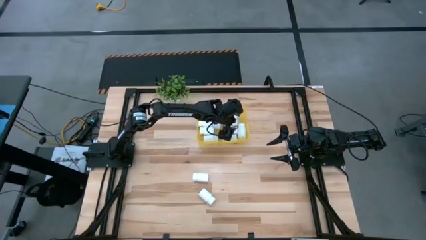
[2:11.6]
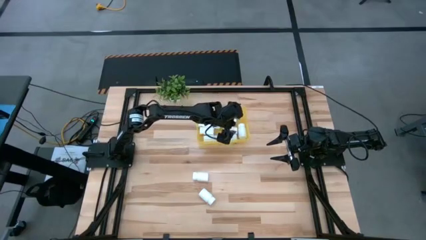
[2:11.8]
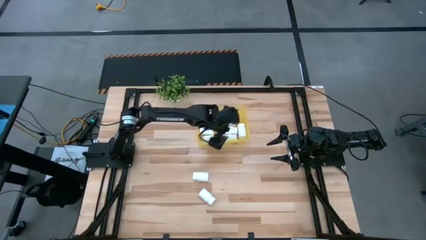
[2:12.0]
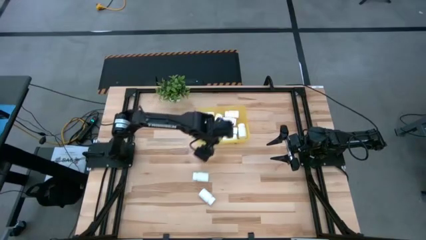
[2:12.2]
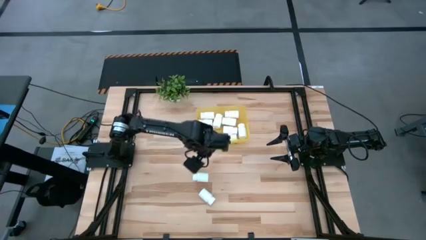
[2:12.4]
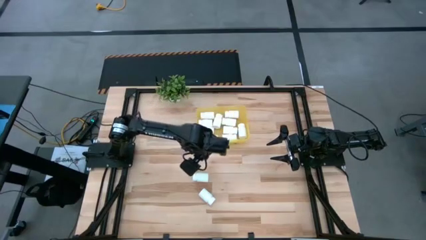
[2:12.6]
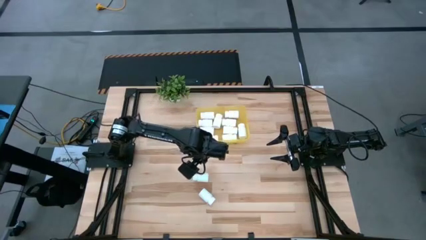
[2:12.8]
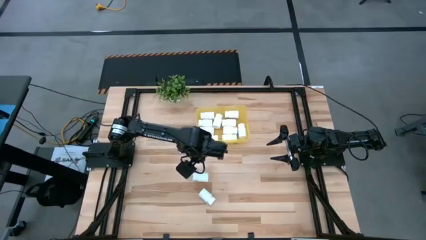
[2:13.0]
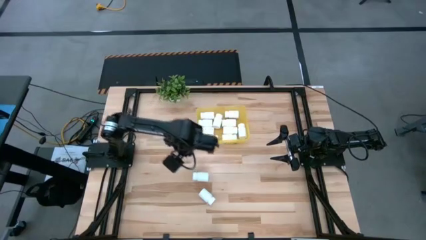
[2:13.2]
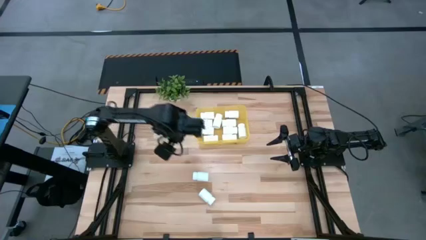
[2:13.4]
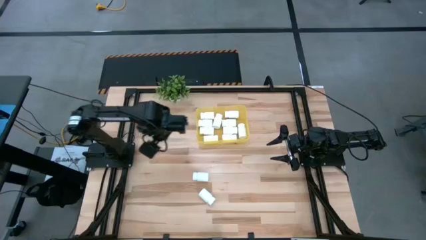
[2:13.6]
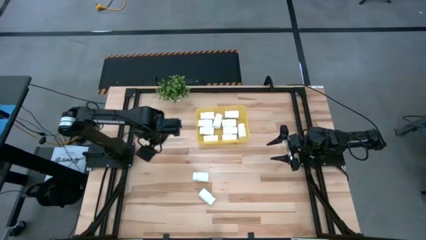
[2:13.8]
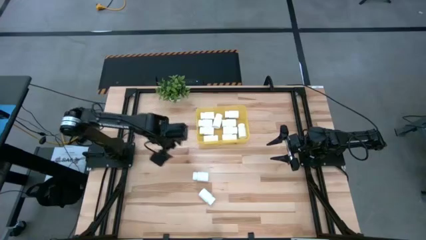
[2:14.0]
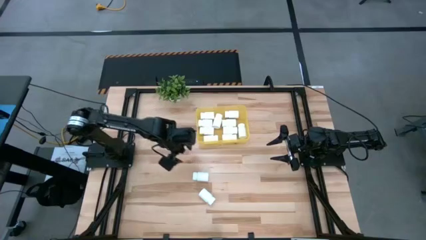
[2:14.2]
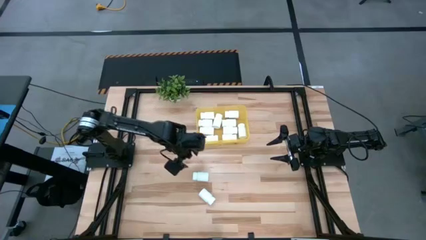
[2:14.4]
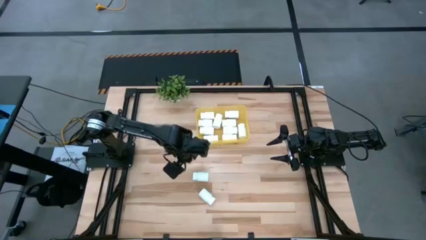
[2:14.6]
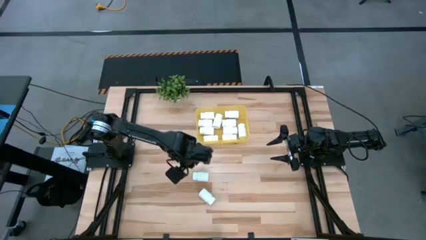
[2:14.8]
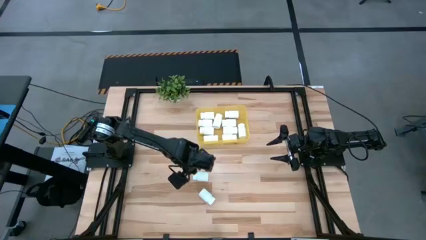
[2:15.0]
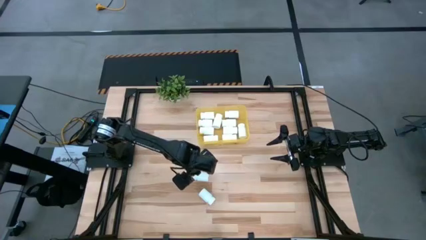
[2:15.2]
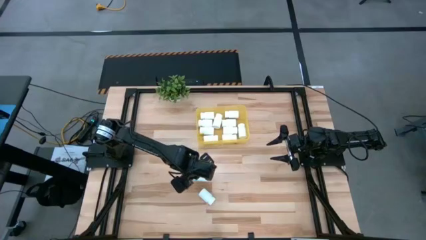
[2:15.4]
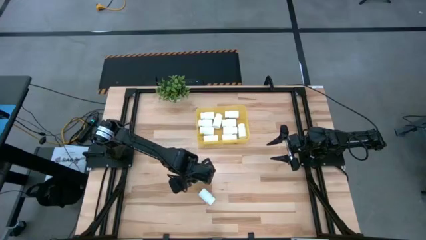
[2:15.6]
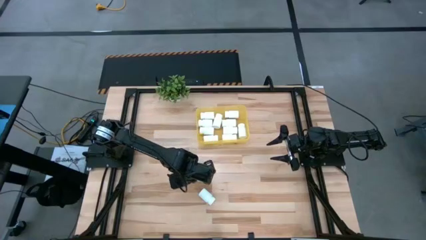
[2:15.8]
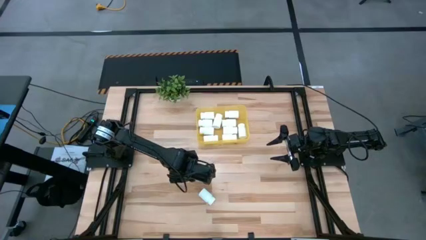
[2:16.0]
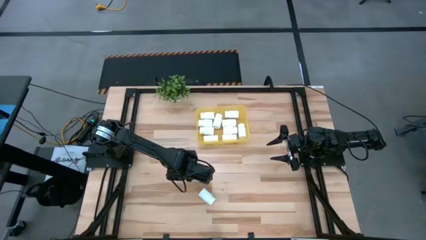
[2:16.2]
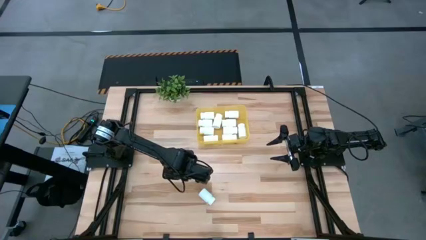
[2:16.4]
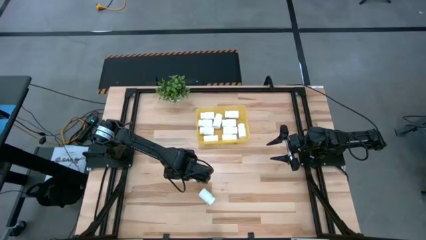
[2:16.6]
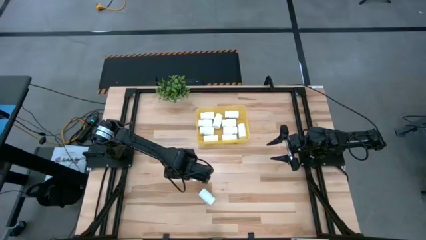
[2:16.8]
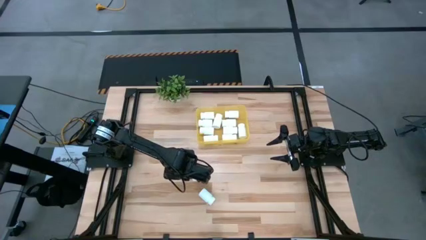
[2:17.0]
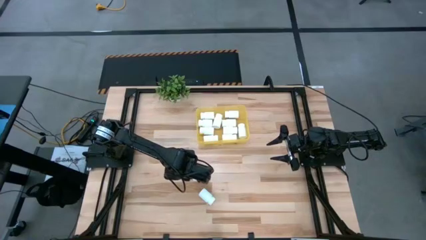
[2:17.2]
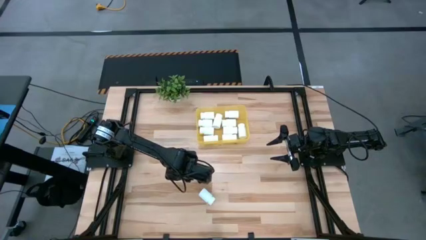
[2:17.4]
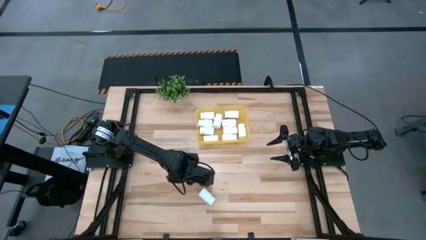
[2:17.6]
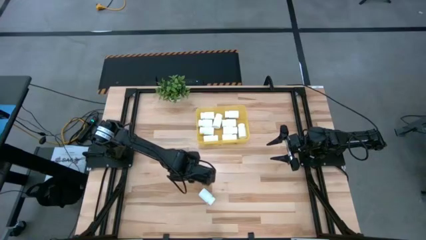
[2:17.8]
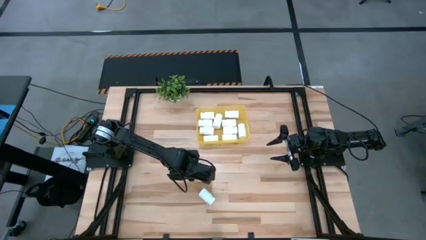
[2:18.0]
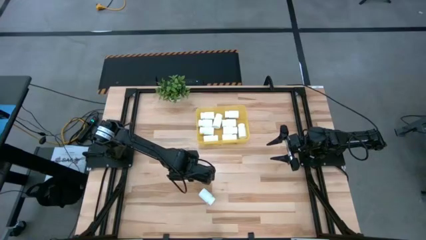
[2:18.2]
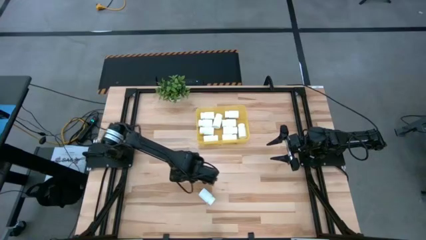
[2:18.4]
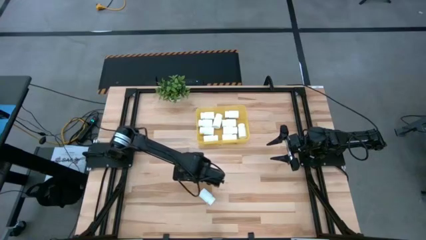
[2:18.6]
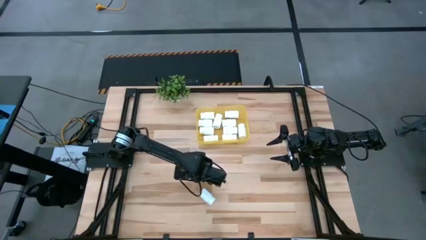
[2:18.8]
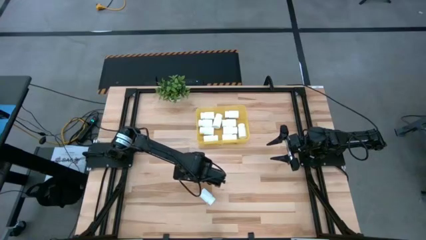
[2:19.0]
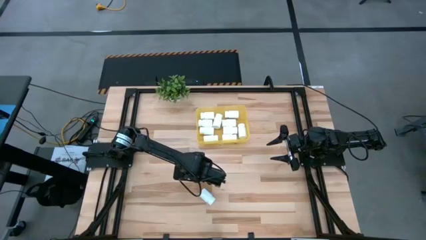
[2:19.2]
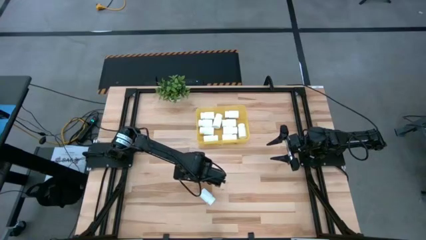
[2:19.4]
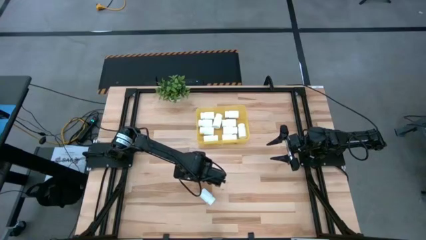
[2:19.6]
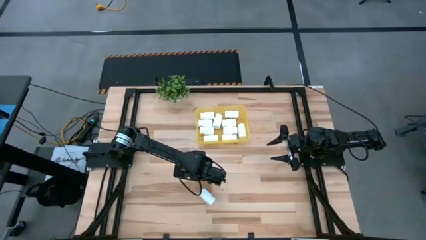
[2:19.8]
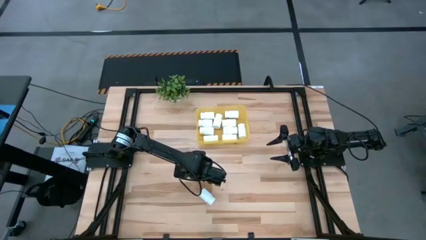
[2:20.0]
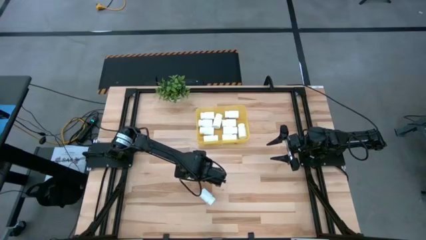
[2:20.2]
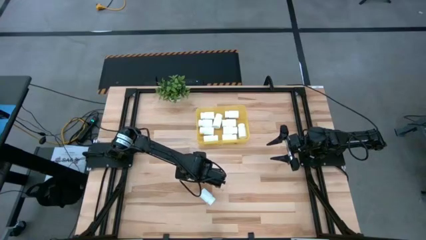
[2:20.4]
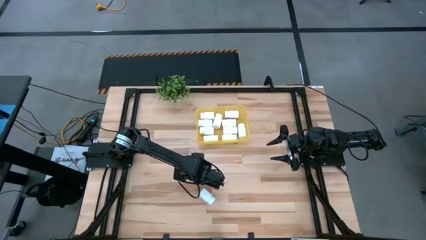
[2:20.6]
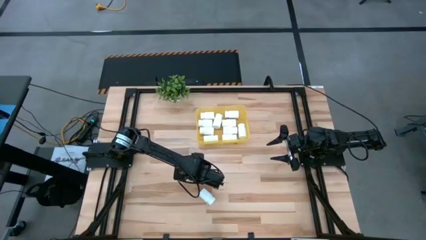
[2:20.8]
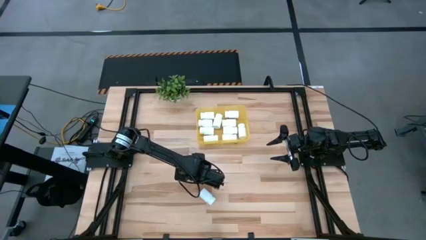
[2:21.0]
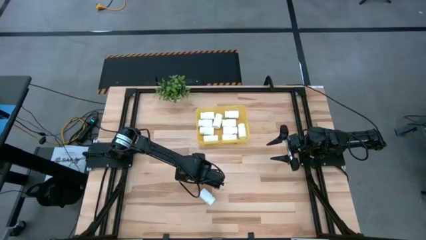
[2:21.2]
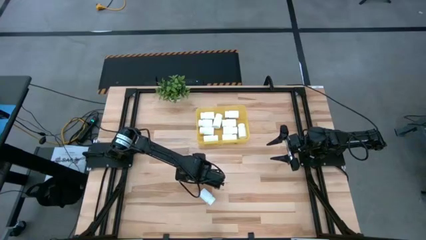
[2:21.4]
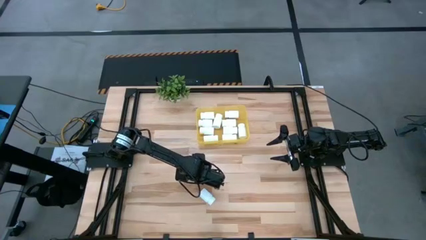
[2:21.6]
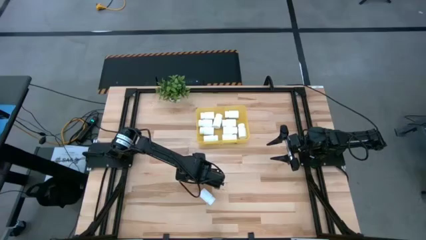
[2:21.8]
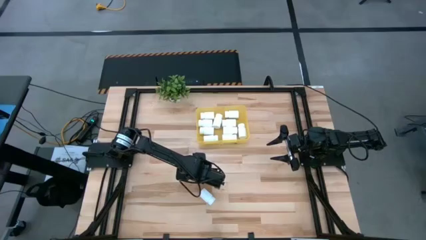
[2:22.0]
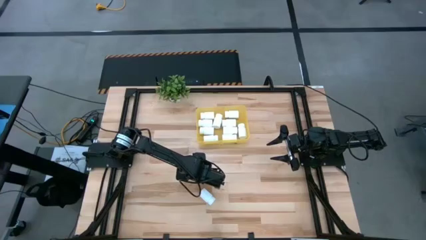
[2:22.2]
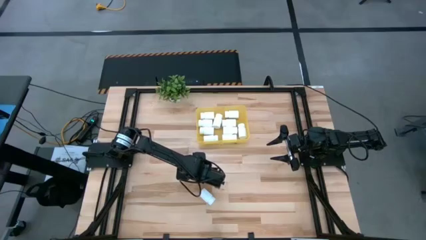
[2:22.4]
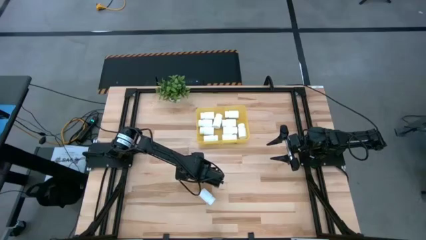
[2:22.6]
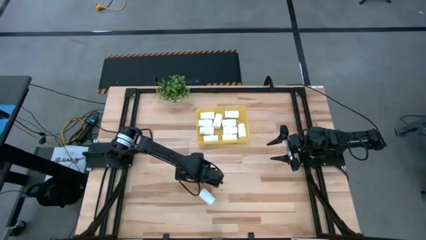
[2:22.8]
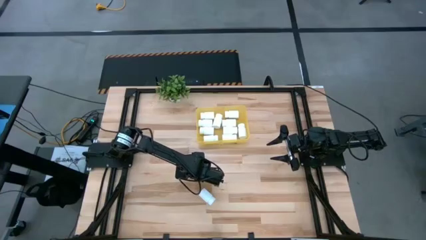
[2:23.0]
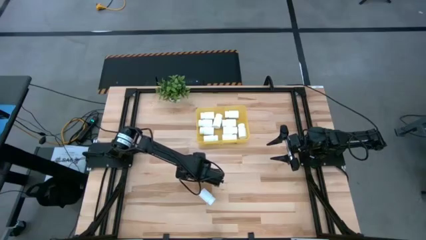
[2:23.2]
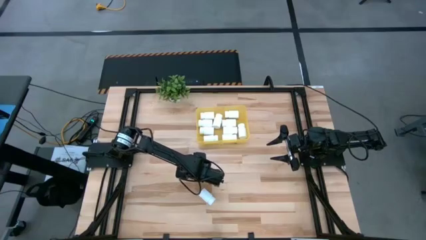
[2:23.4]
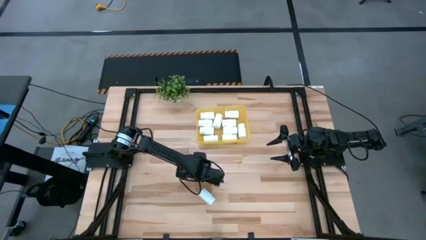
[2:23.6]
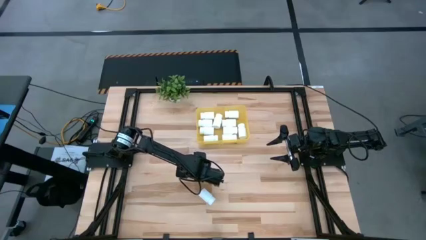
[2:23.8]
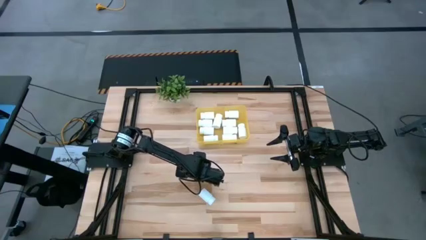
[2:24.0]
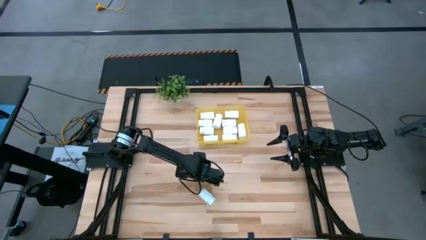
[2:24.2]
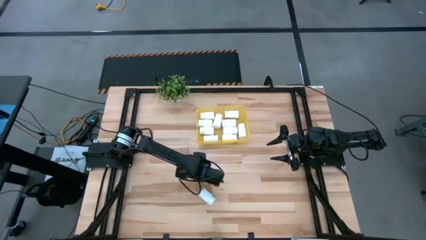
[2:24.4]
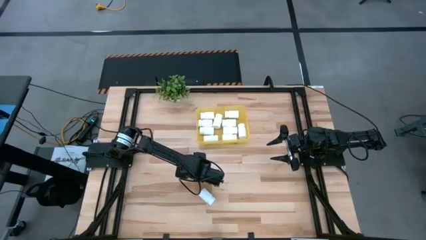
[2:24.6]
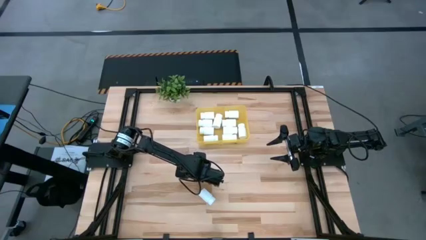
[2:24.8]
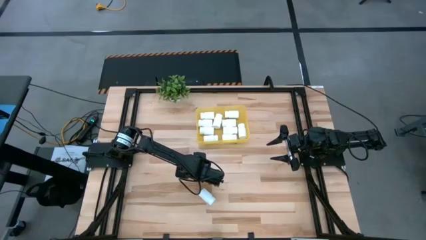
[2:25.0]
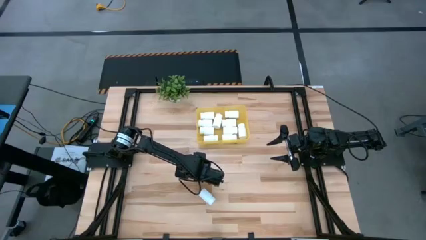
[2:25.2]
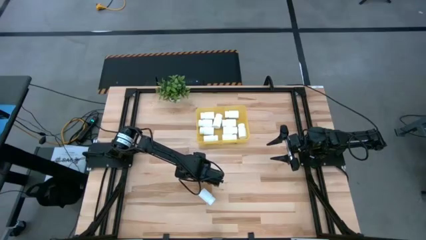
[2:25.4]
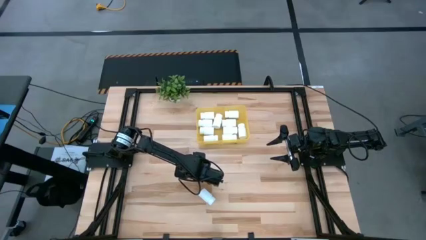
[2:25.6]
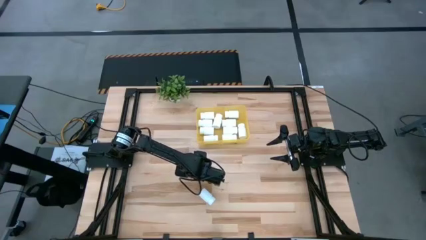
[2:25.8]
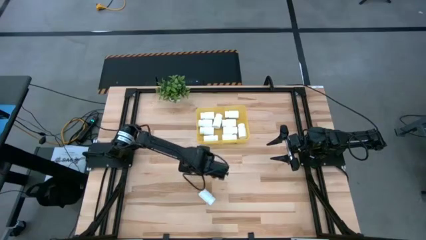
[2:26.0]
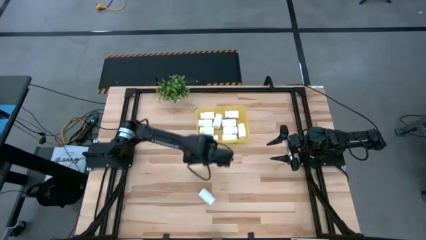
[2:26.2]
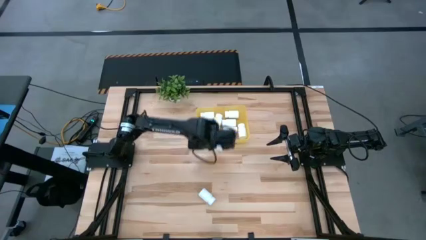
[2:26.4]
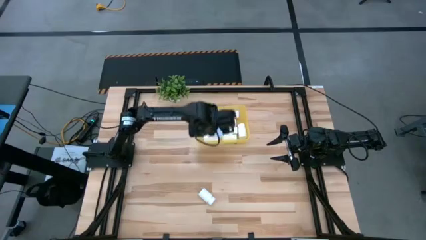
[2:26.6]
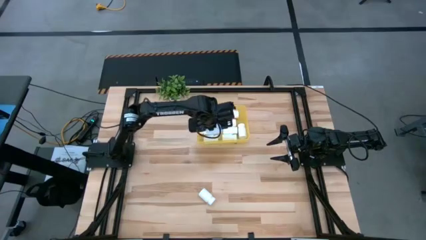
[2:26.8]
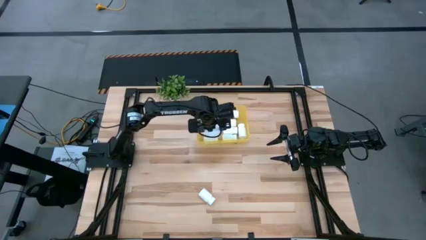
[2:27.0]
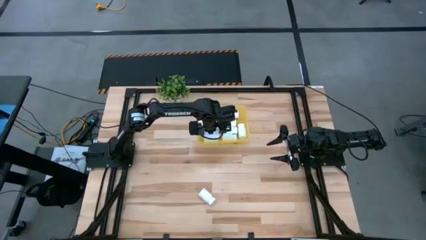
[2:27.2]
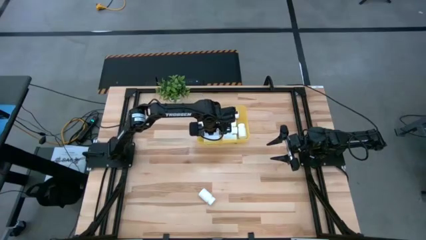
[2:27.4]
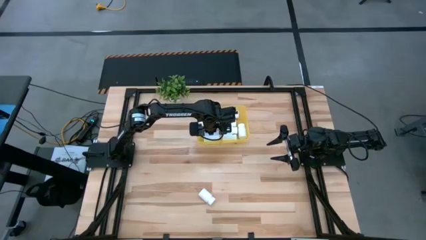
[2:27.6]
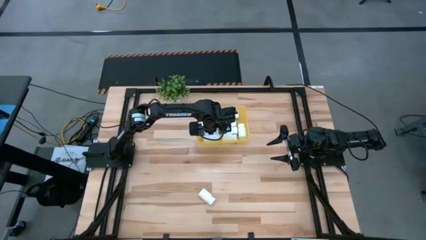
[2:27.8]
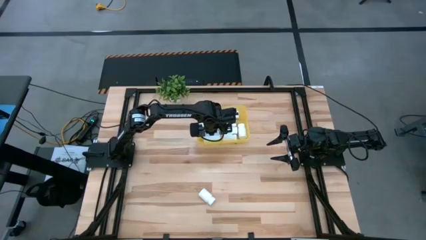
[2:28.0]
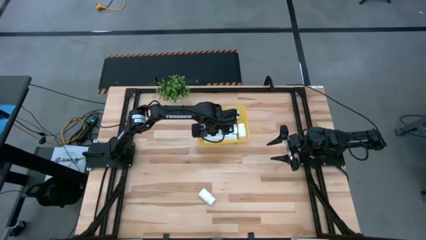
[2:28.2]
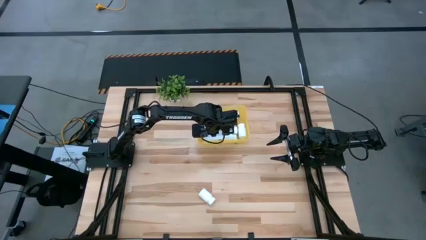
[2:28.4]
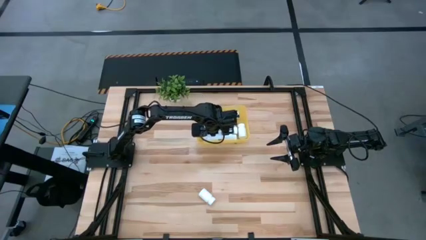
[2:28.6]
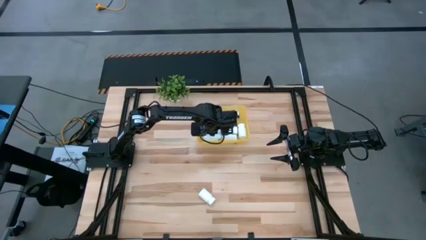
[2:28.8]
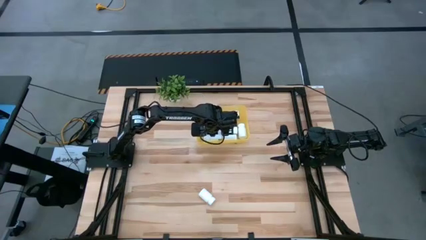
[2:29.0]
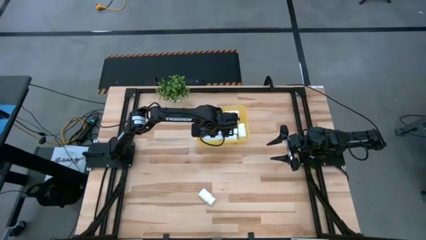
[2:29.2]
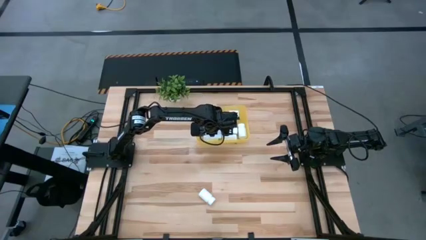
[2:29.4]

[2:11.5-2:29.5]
Task: Pick and place pill bottles into a basket
Put the white pill bottle into the yellow bin
